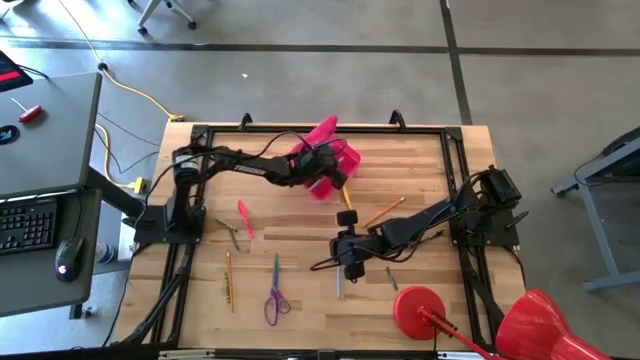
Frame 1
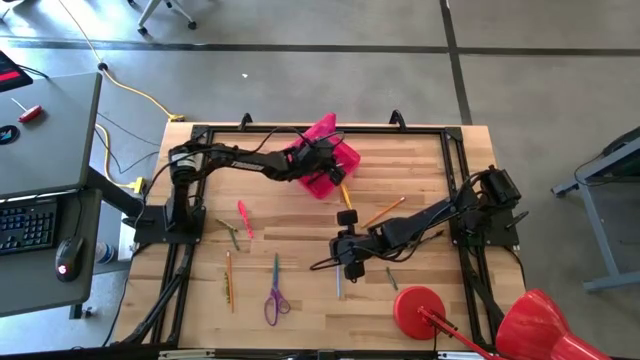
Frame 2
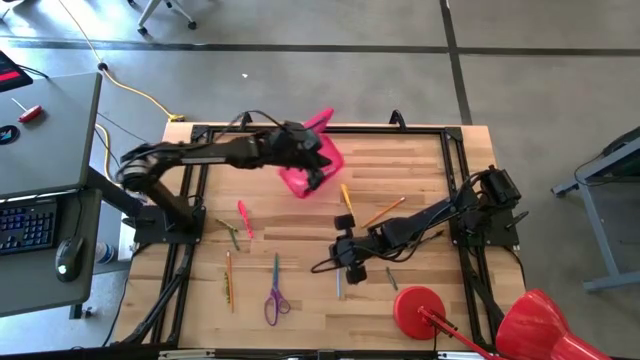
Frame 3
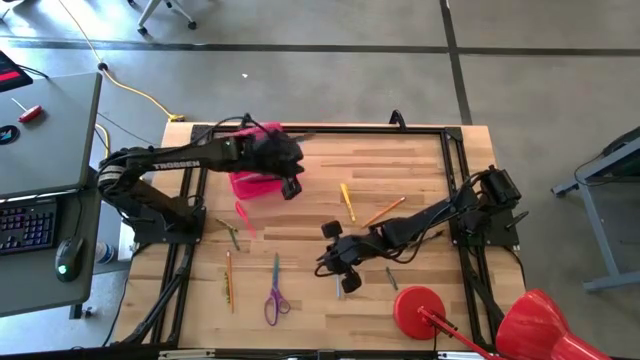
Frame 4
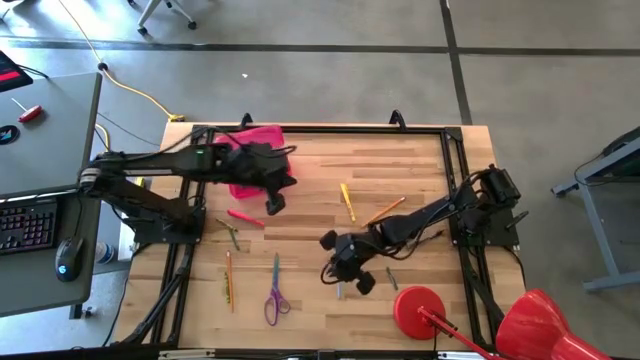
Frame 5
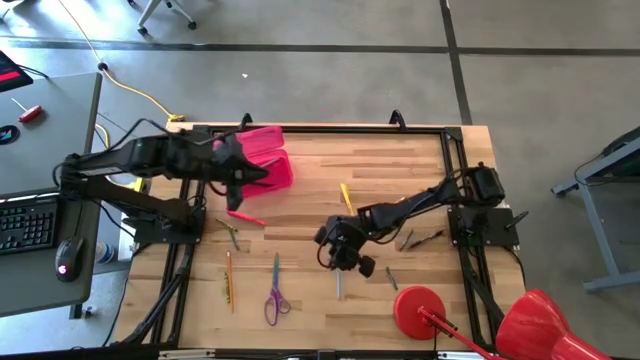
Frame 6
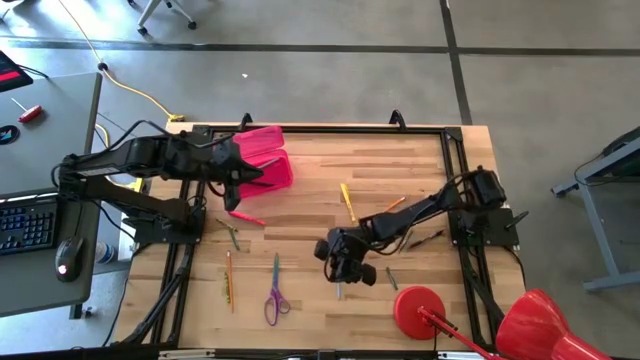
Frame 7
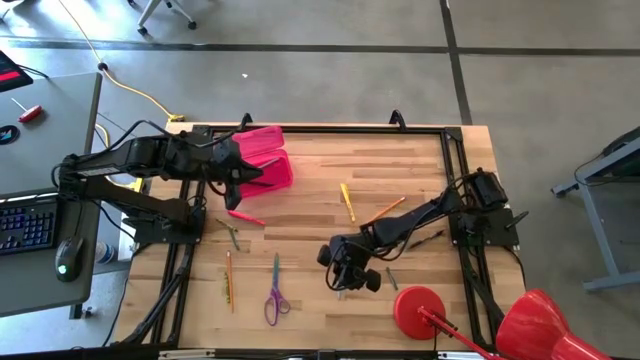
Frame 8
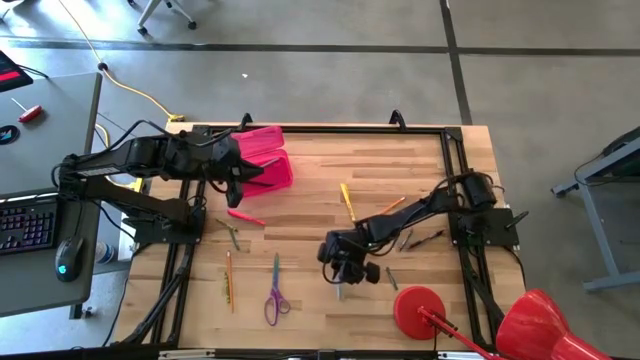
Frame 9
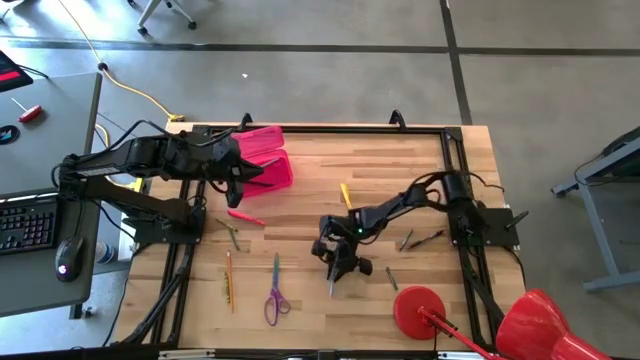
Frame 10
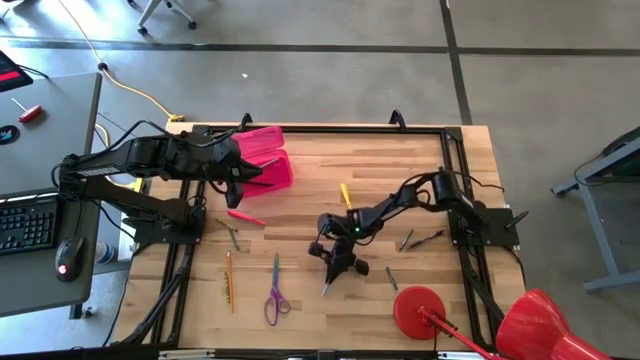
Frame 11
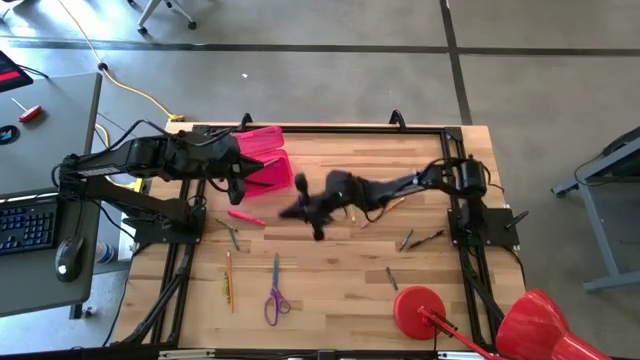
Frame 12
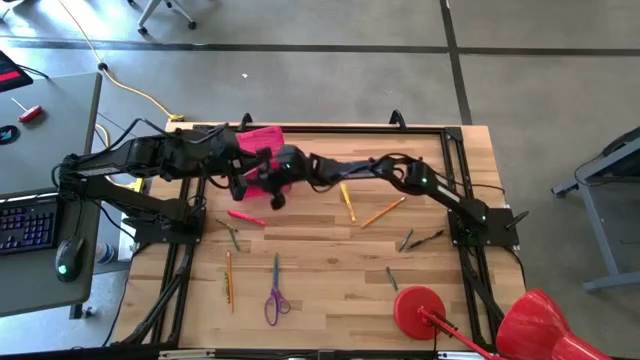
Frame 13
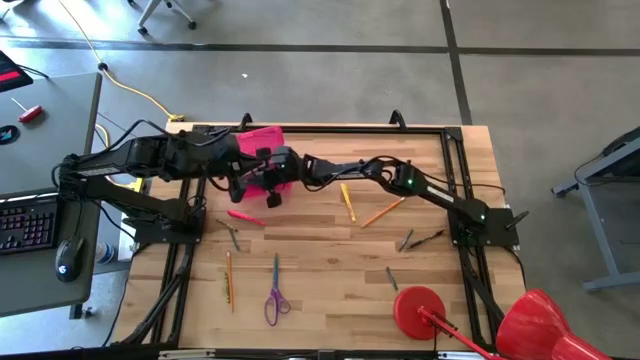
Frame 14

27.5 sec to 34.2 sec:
Task: Pick & place school supplies into a supply box
Put the blue pencil into the supply box

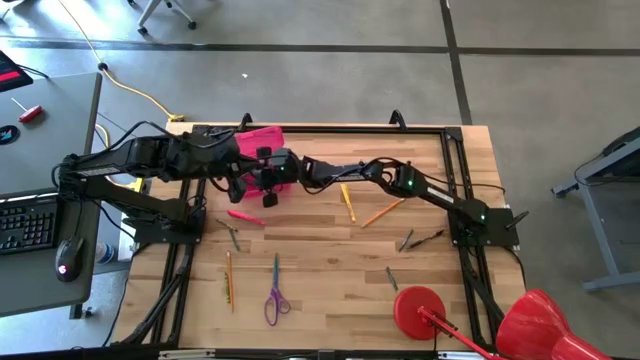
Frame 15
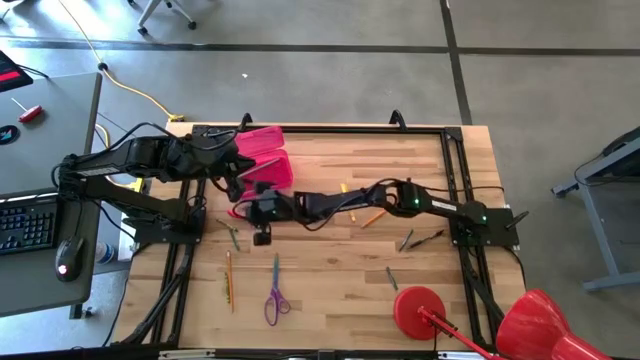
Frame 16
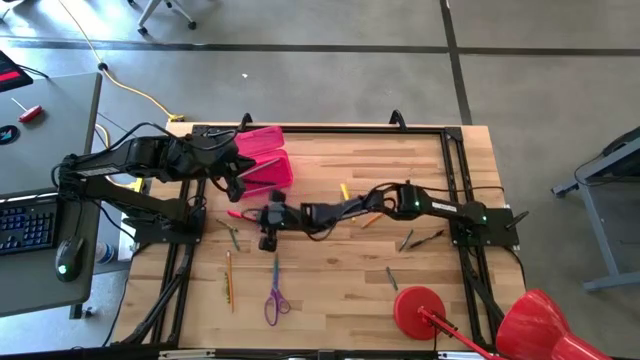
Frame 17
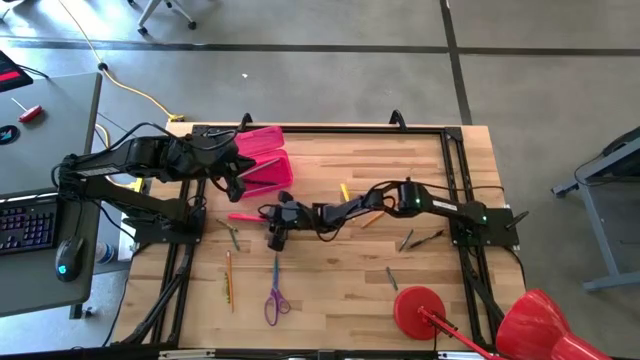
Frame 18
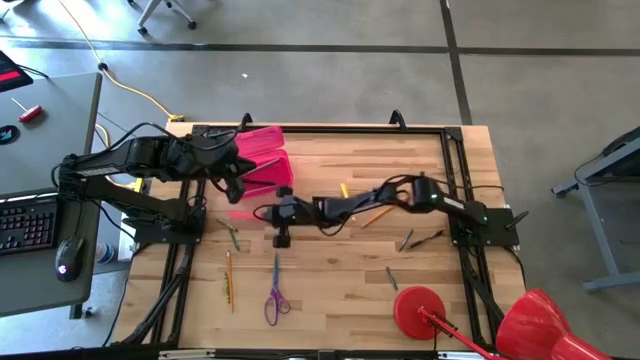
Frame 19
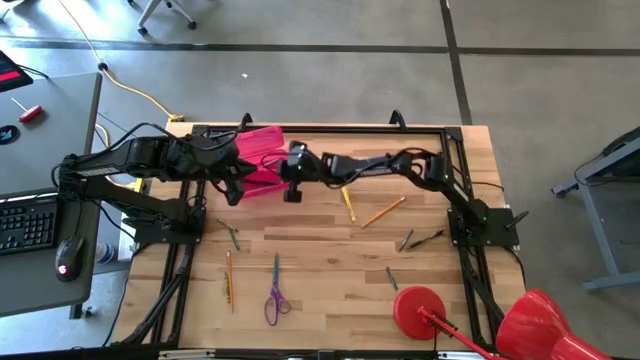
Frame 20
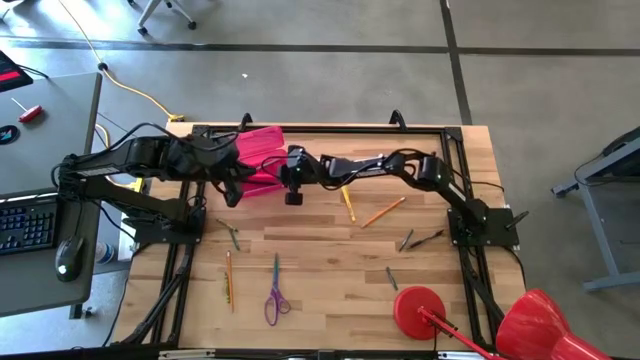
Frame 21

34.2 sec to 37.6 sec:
Put the pink pen into the supply box

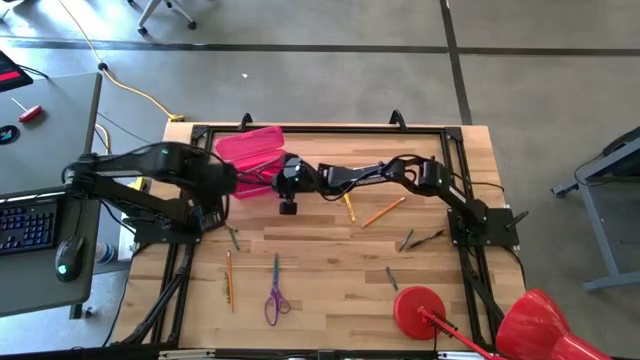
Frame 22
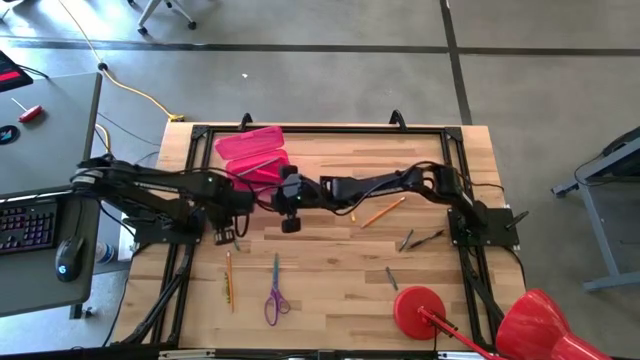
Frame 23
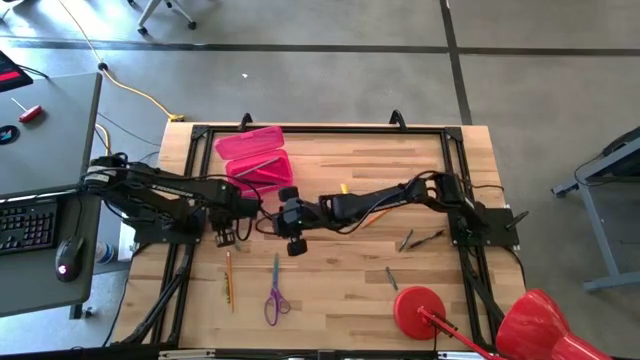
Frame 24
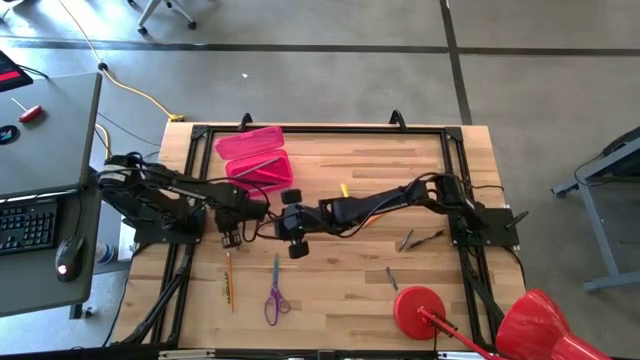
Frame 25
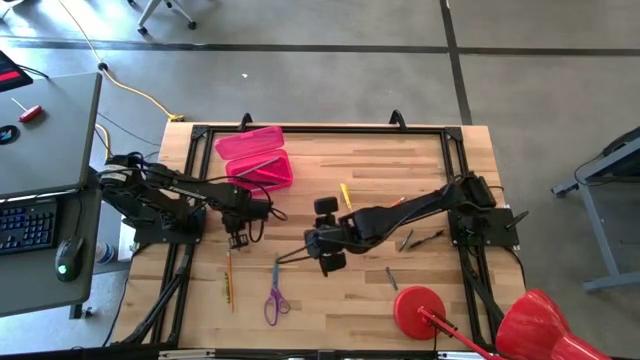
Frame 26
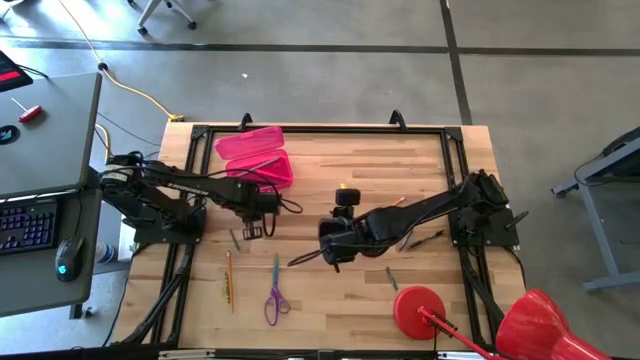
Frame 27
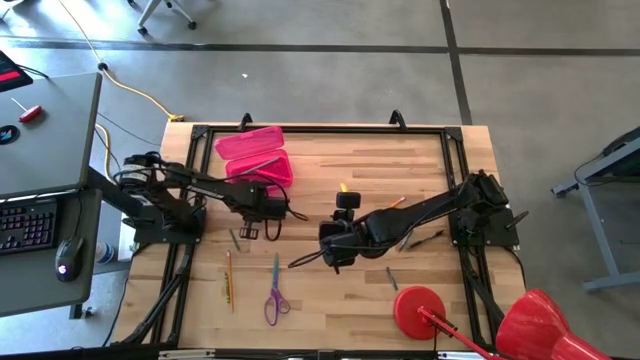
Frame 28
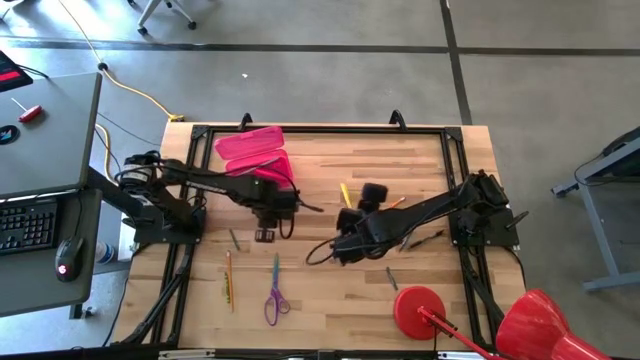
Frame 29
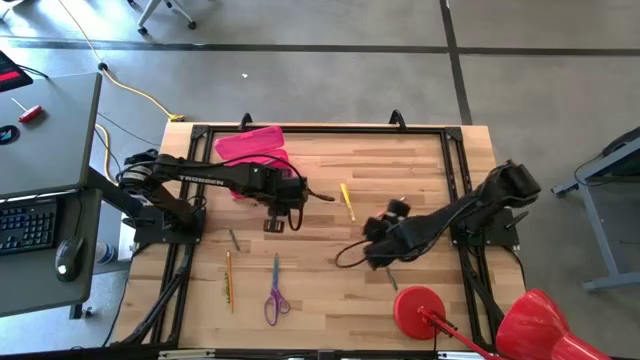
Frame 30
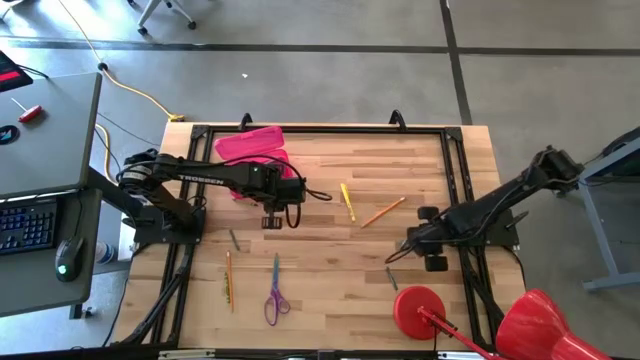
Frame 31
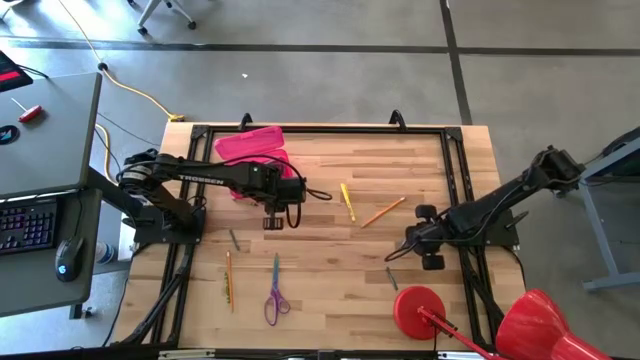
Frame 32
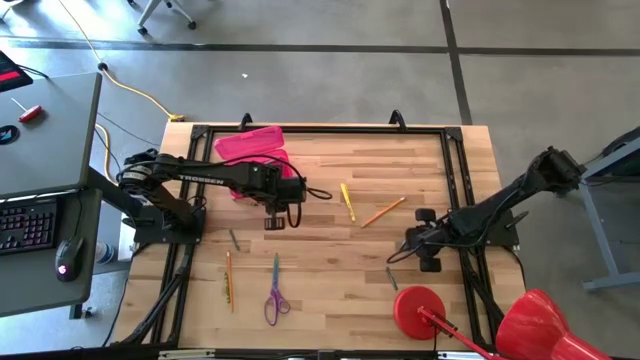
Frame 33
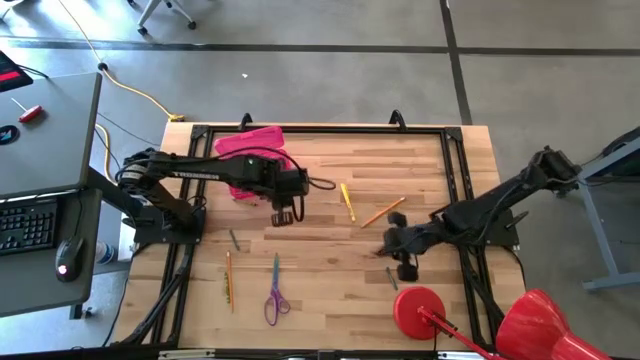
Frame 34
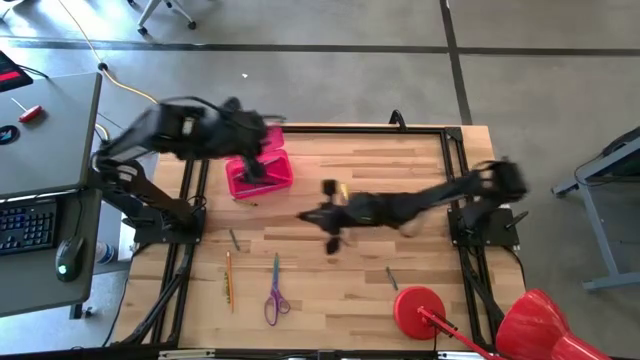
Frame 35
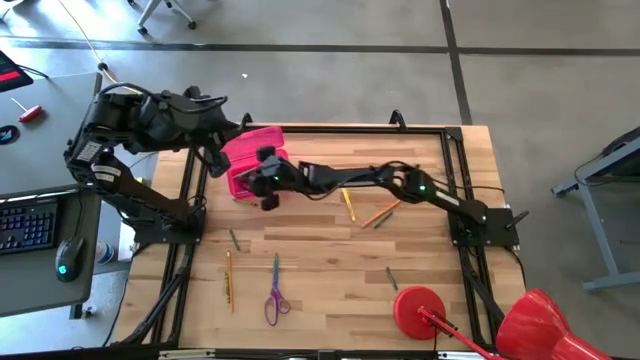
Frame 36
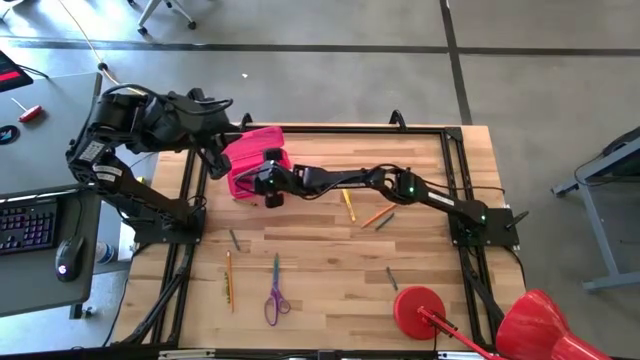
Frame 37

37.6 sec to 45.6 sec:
Put the black transparent pen into the supply box

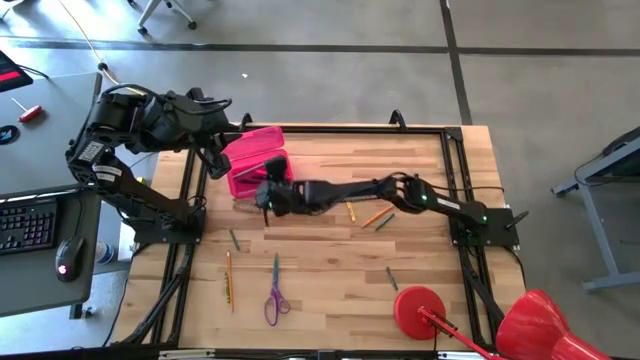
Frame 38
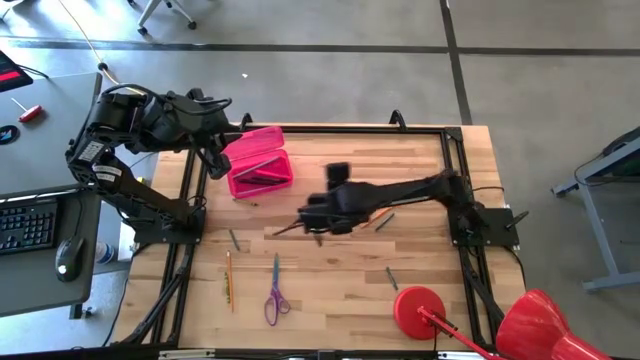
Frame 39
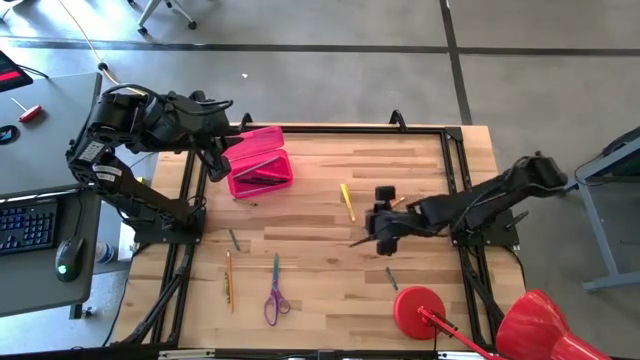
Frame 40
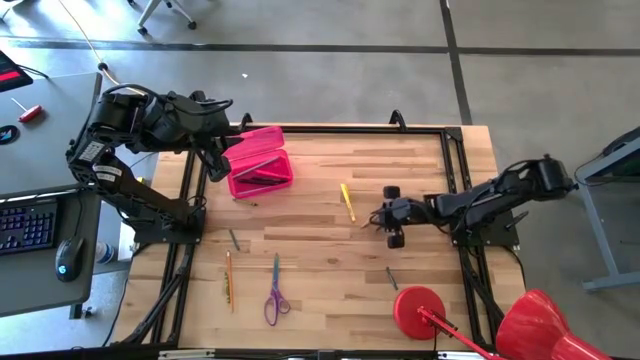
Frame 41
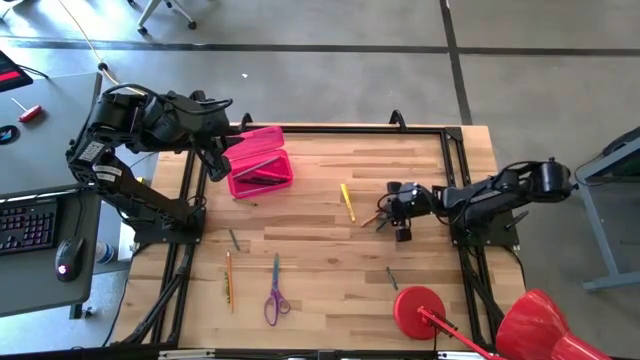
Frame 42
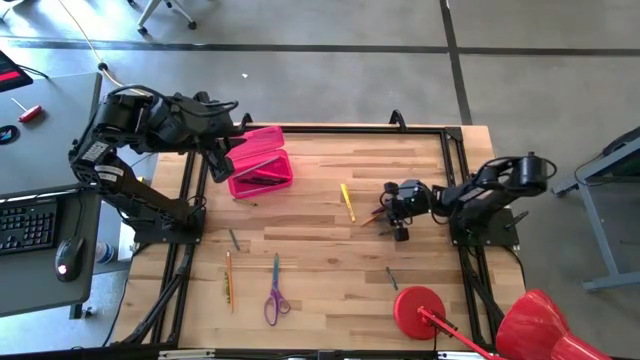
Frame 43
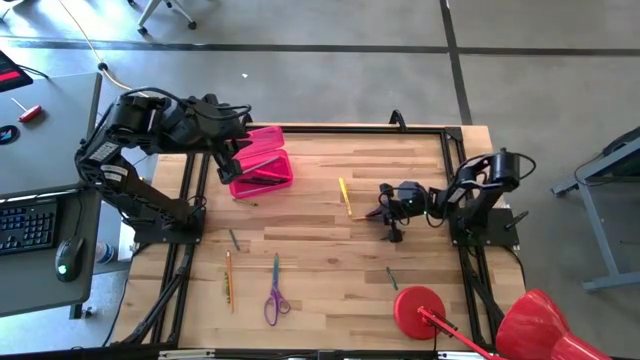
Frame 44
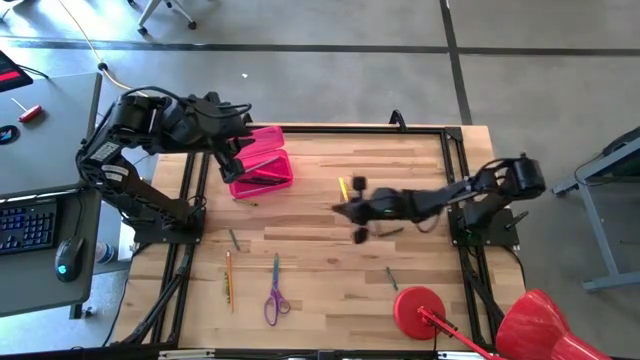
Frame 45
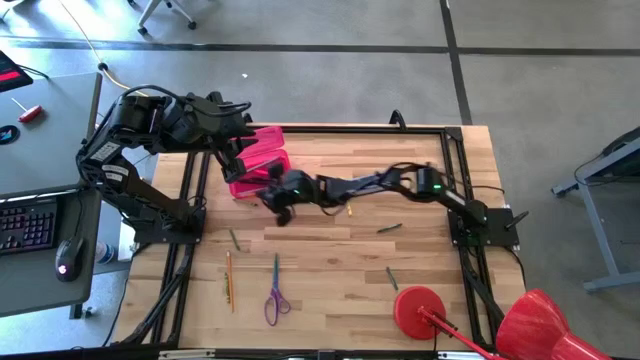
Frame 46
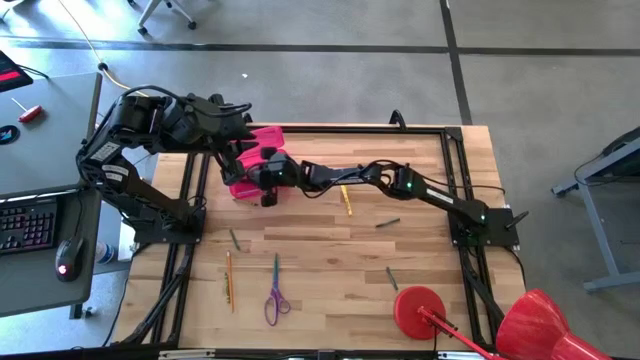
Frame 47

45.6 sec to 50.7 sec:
Put the right orange pencil into the supply box
